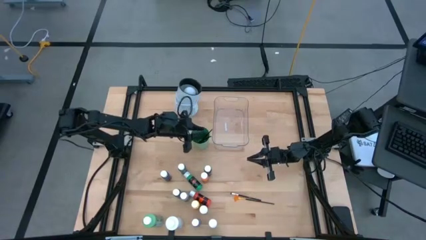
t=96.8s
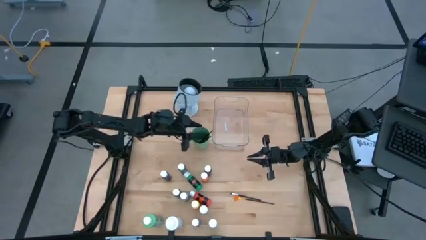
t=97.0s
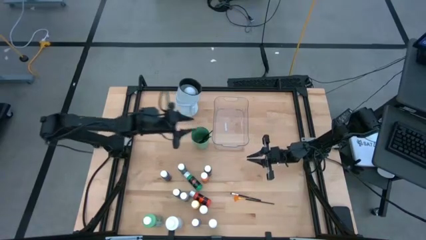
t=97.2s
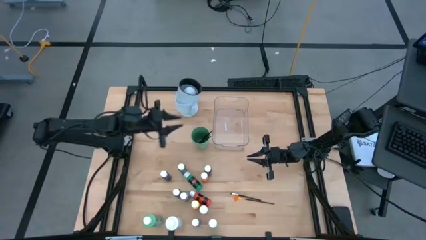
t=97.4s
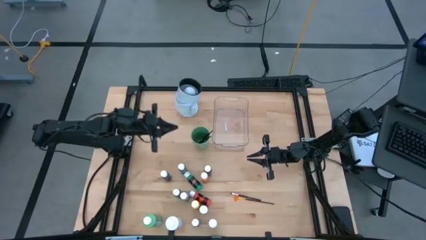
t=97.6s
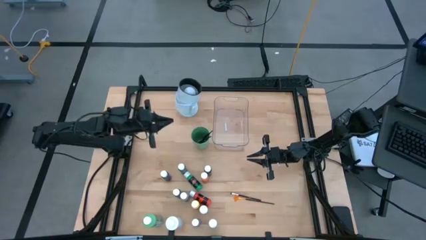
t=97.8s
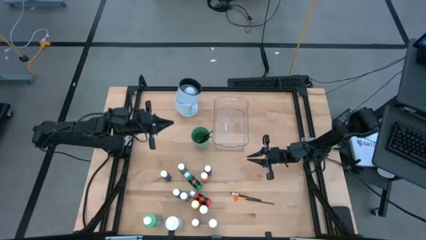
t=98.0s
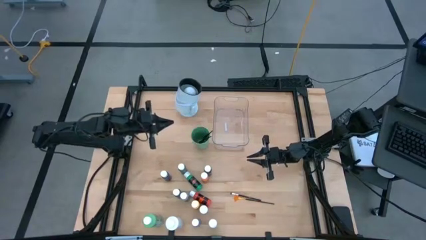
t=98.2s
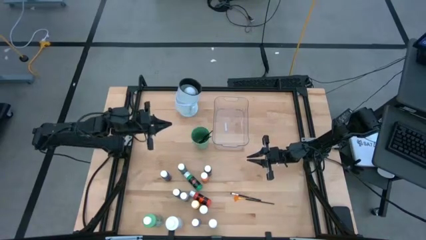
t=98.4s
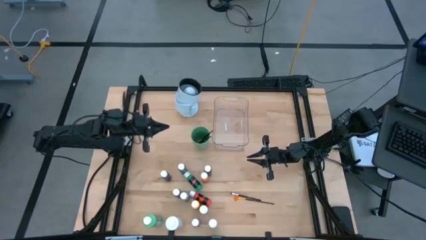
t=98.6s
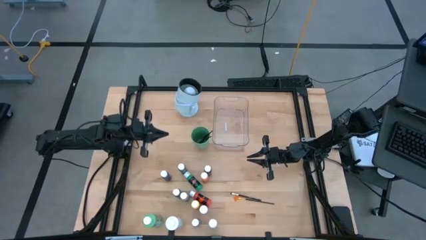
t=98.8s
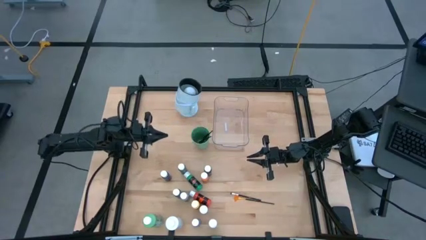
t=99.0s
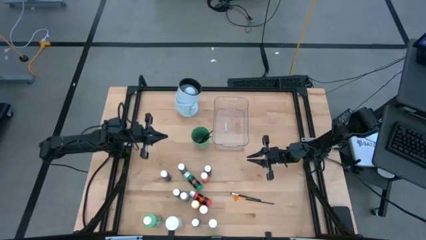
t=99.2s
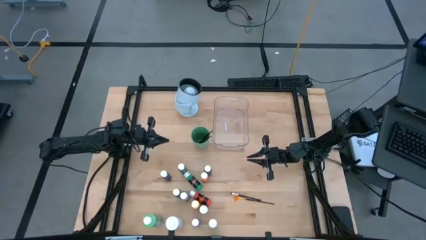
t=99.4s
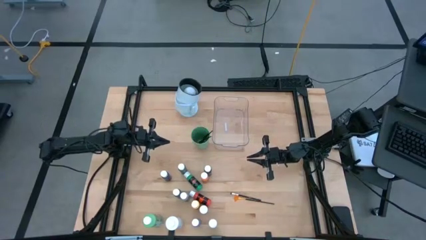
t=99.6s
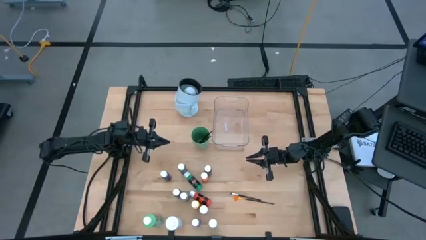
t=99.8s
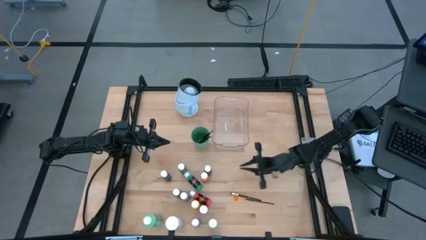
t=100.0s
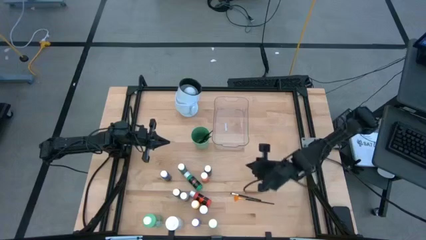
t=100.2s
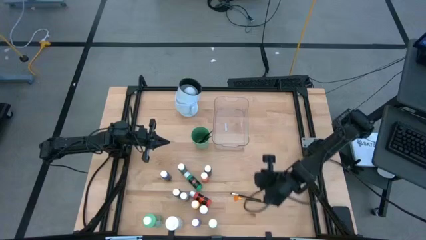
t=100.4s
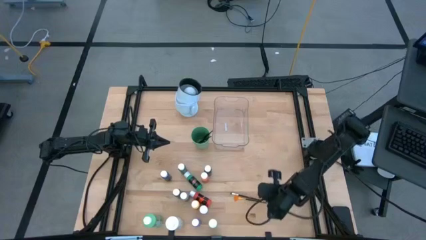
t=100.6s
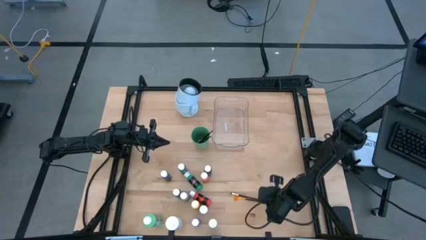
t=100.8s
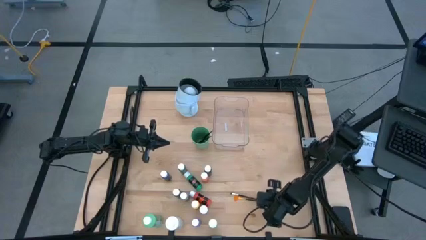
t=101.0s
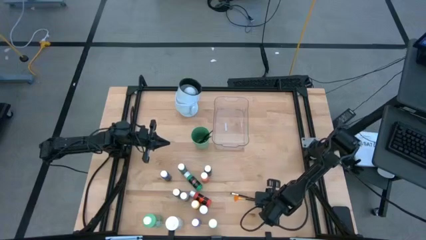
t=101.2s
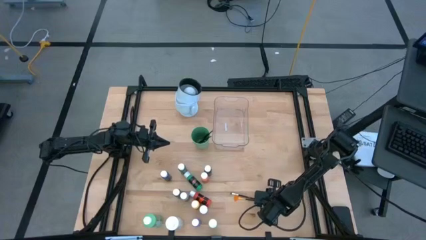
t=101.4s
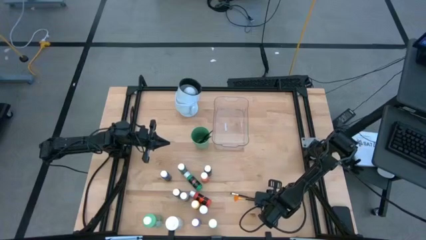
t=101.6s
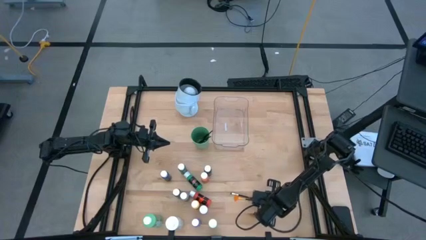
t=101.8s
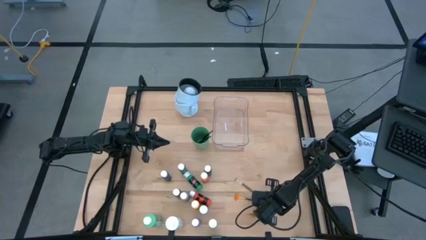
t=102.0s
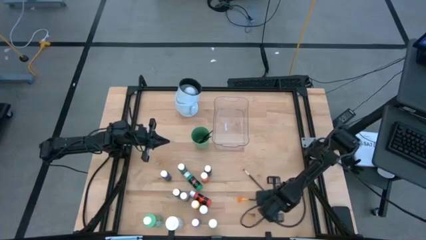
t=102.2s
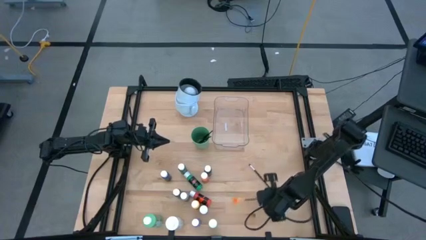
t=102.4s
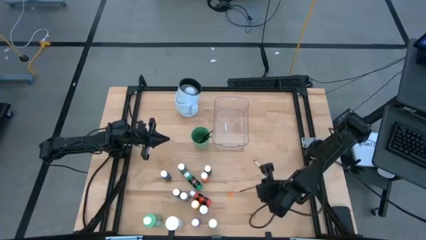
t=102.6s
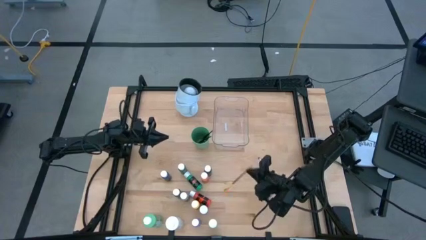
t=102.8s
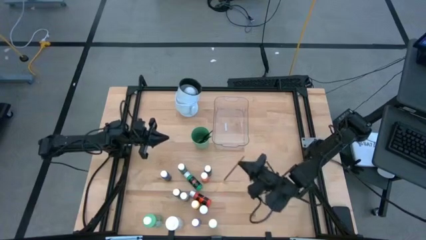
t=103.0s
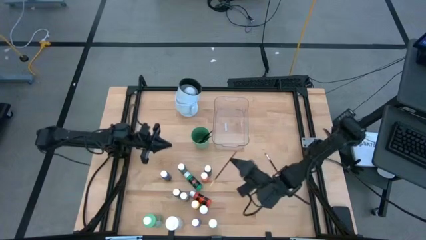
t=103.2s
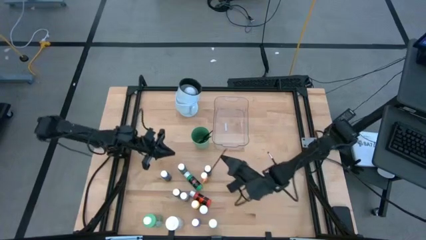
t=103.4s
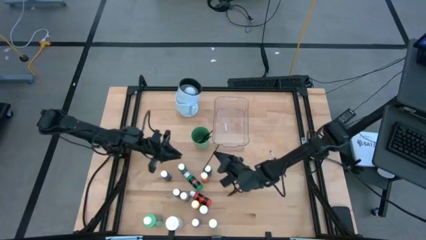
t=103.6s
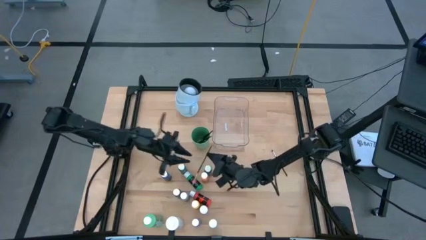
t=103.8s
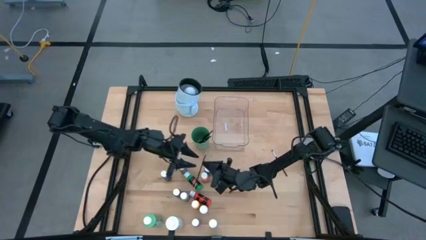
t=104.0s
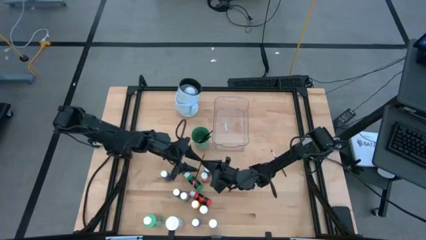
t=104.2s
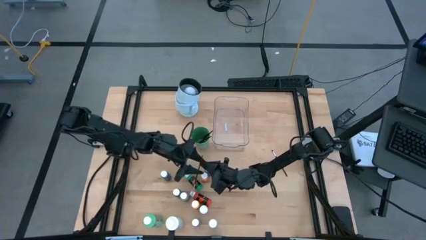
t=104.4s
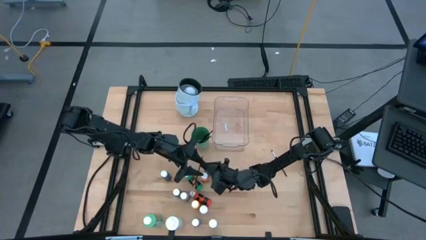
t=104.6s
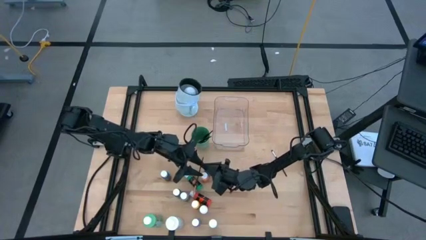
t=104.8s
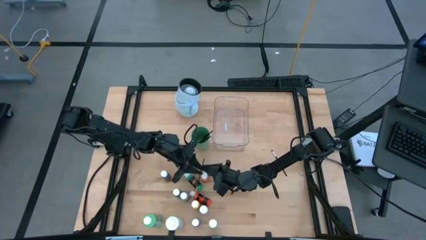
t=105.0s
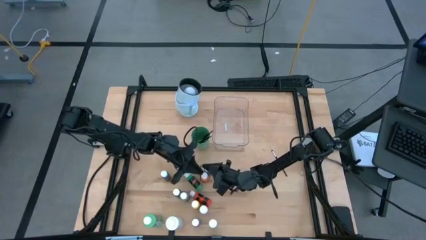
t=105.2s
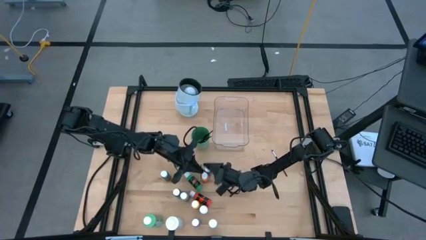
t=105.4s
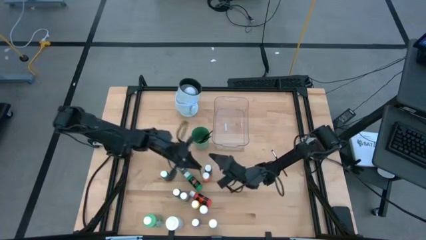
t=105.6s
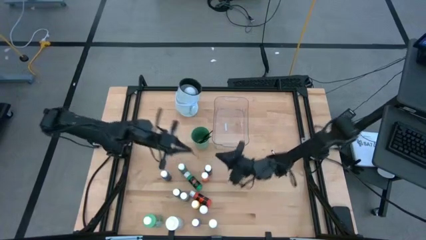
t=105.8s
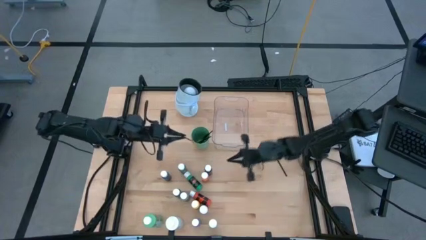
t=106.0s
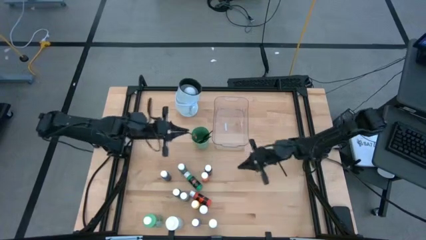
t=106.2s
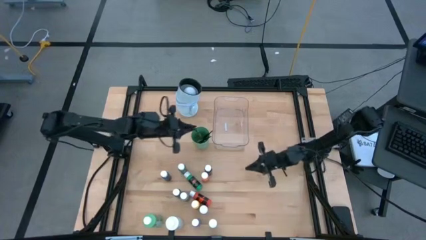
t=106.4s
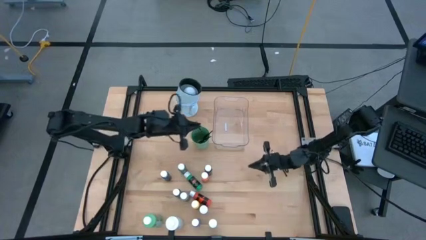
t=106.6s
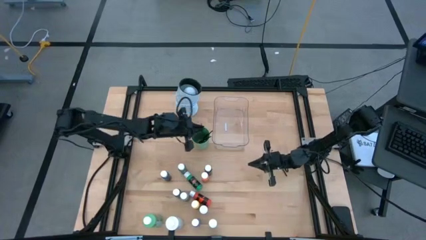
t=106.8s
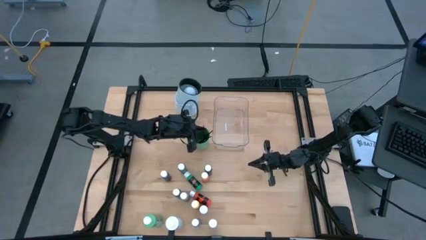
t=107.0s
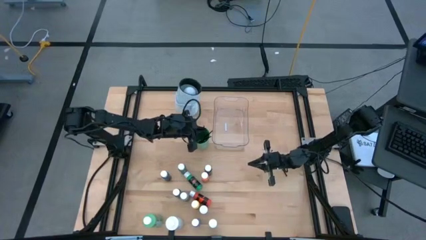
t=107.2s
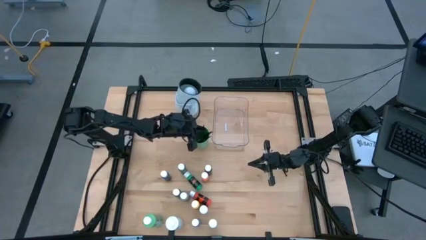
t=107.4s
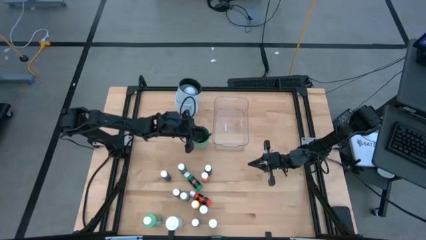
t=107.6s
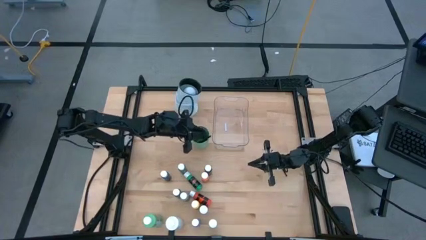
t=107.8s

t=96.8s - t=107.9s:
Task: Pick & Place Paint Supplies
Put the yellow paintbrush into the green cup

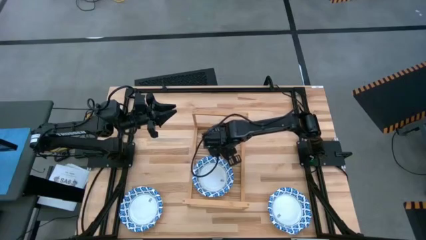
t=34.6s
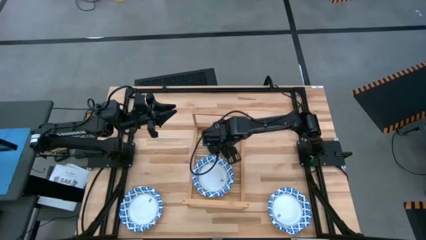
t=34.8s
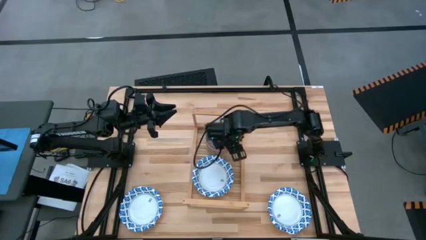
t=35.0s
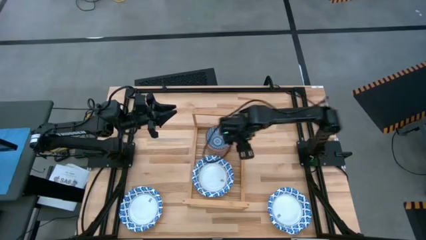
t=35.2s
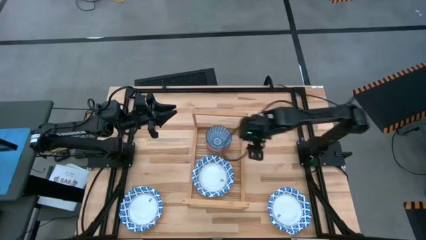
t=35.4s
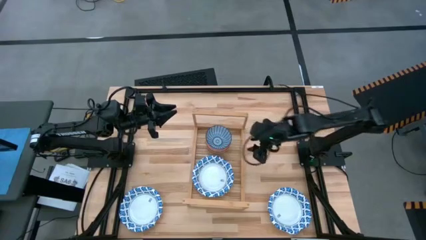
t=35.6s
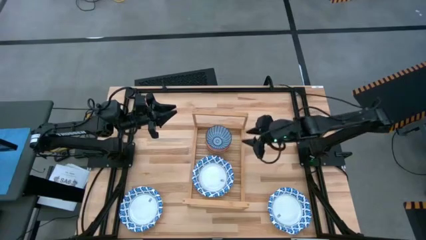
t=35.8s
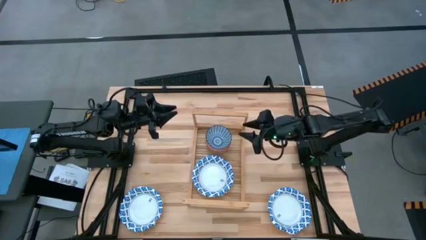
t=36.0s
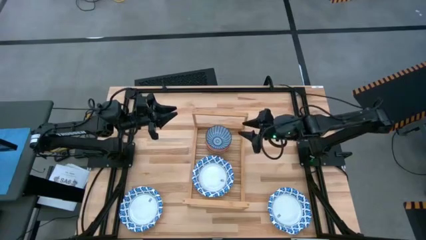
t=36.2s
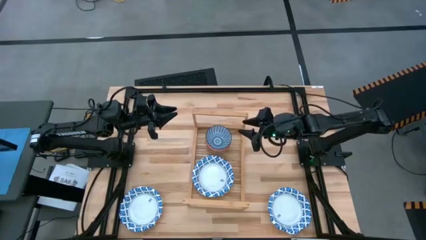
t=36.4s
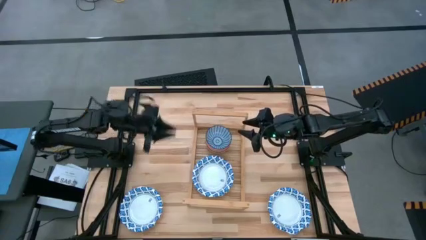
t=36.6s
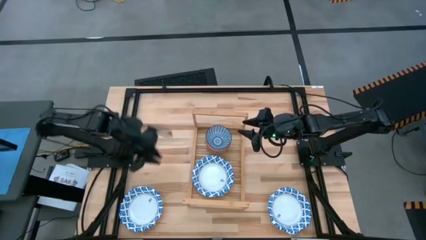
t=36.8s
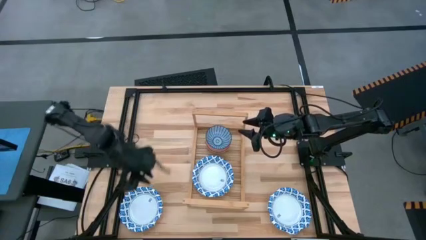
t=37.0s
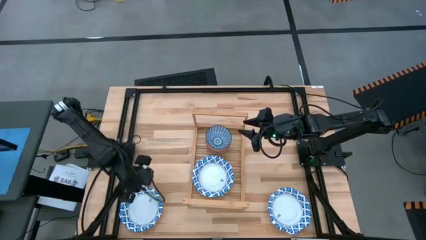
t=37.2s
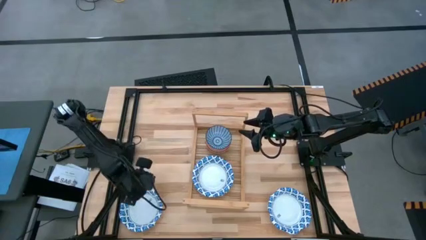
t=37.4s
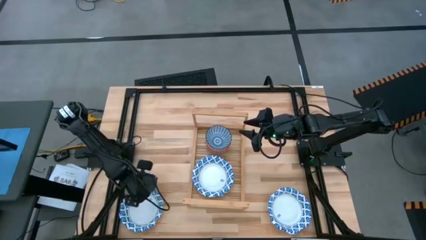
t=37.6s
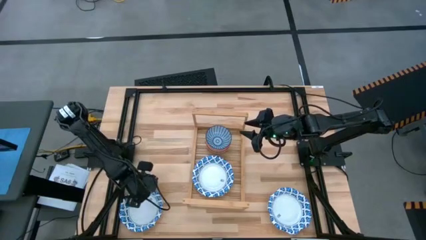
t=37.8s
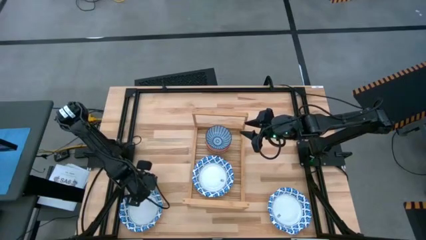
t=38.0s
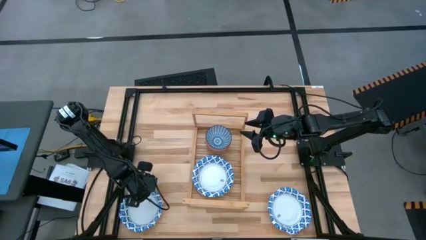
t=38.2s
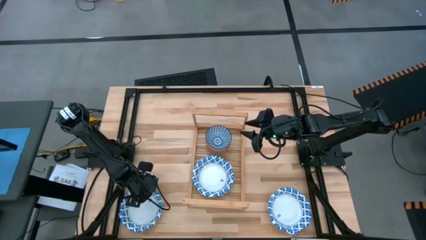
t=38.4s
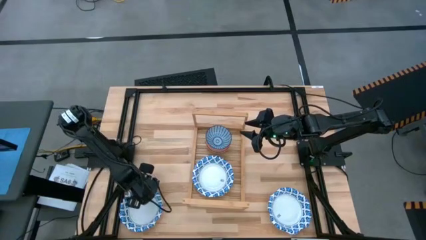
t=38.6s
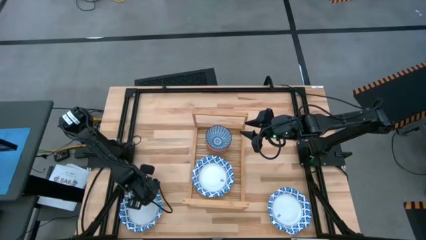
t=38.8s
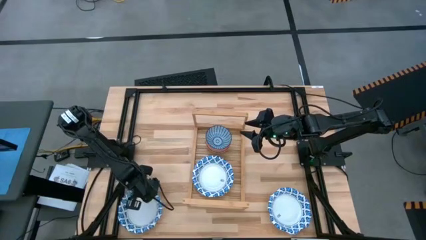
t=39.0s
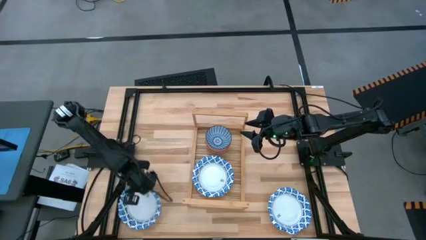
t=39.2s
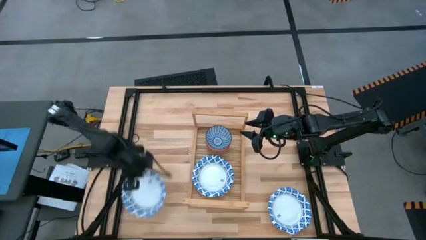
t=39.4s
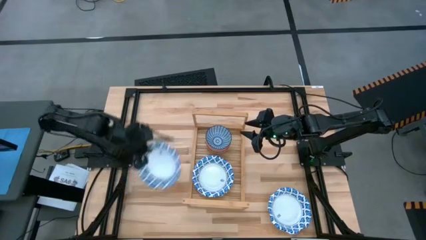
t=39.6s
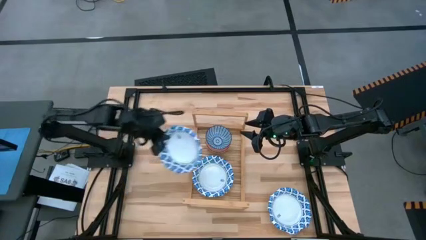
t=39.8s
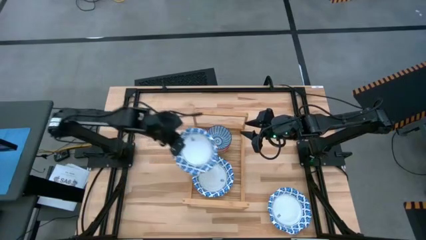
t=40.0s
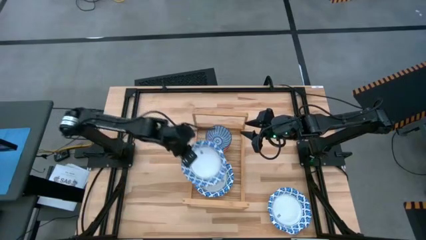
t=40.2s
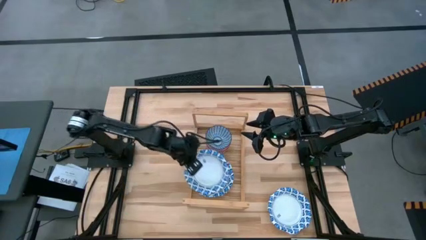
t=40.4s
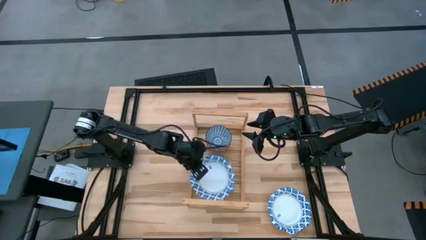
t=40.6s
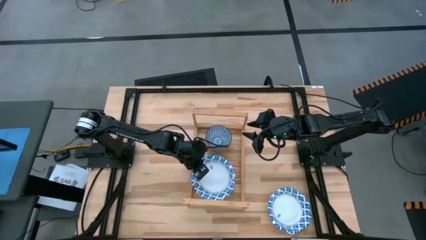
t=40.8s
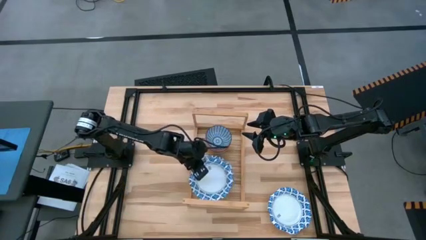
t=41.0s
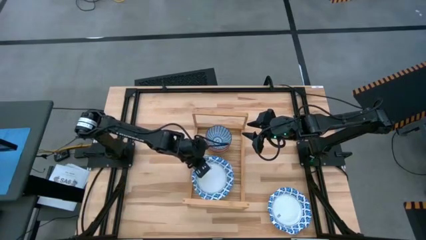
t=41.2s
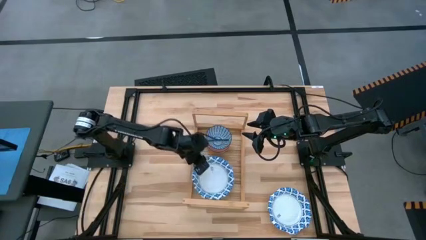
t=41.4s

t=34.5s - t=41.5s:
Task: Place and stack bowls onto a shelf
Stack the left blue patterned bowl on the blue patterned bowl on the shelf
